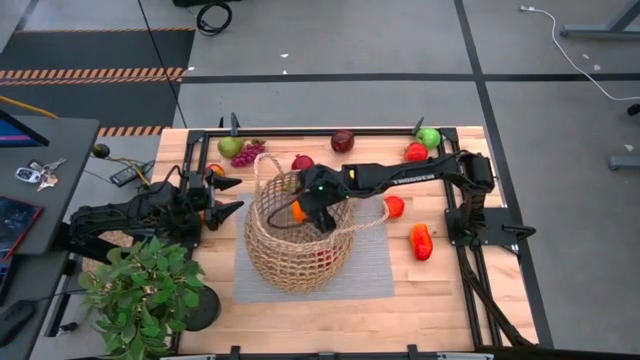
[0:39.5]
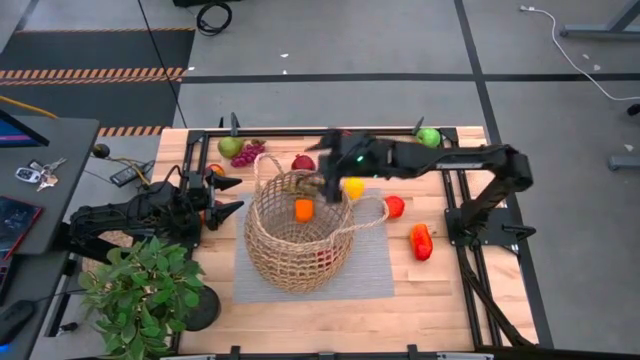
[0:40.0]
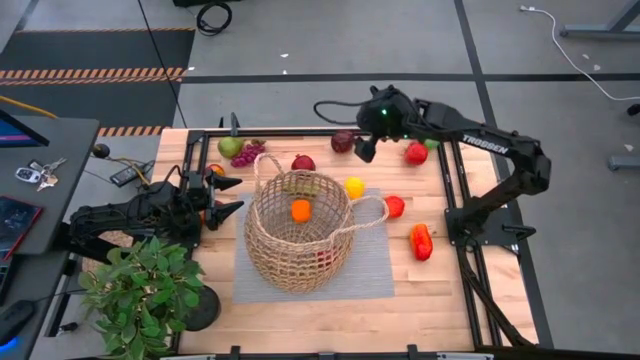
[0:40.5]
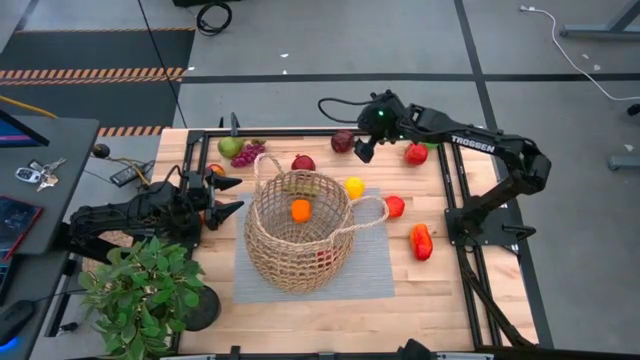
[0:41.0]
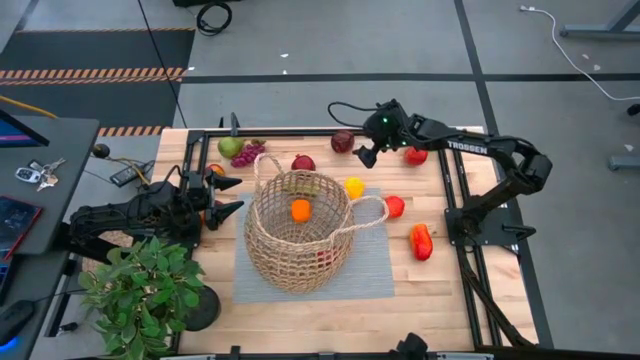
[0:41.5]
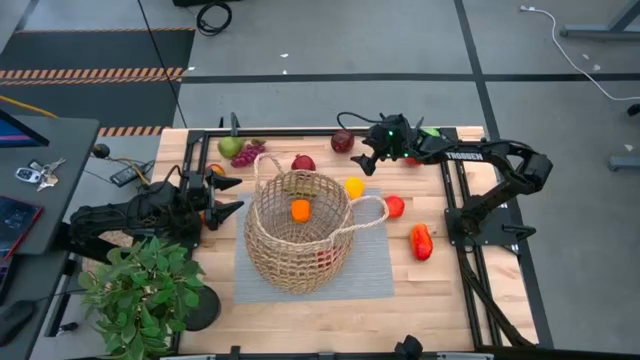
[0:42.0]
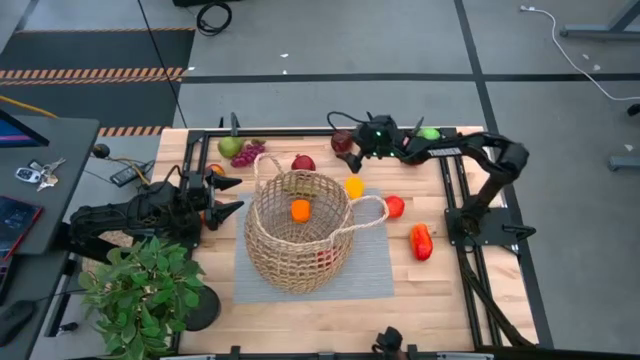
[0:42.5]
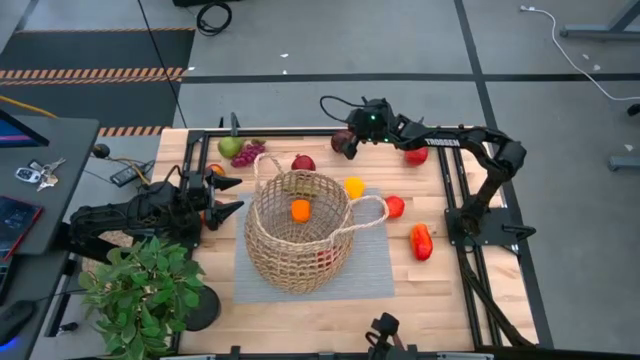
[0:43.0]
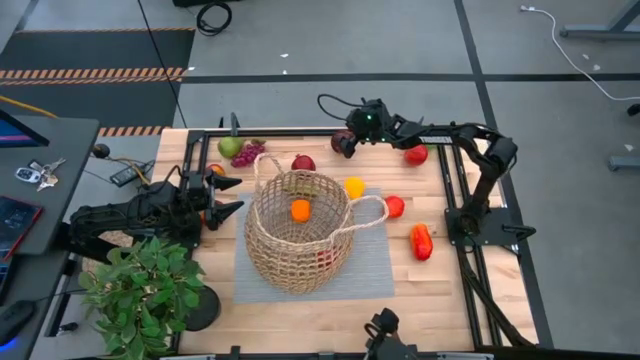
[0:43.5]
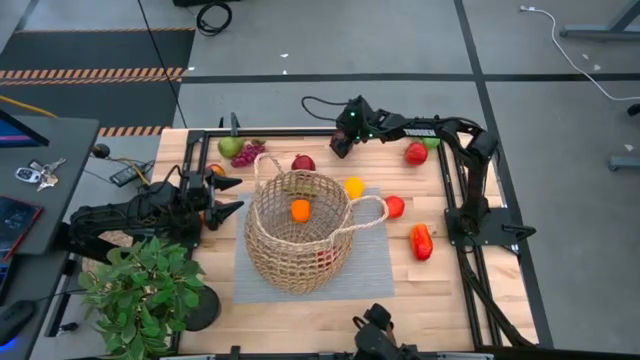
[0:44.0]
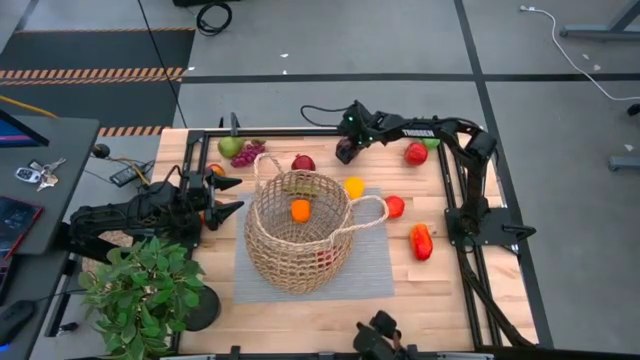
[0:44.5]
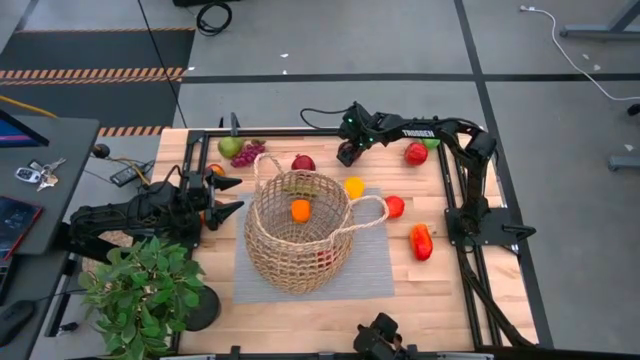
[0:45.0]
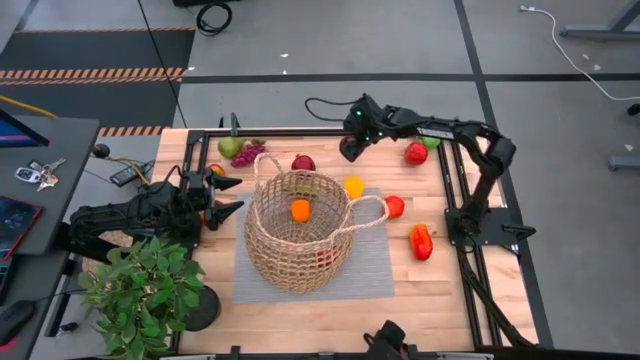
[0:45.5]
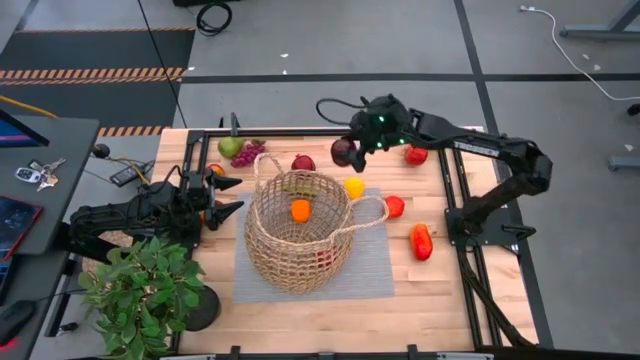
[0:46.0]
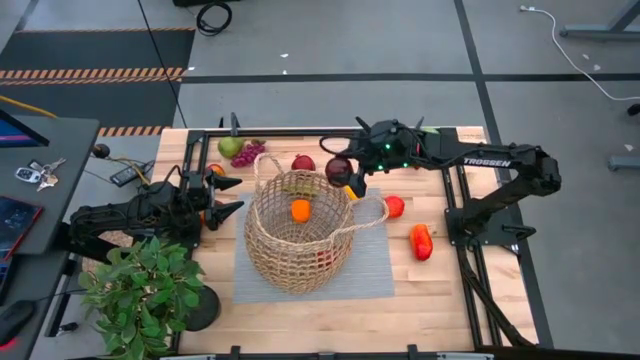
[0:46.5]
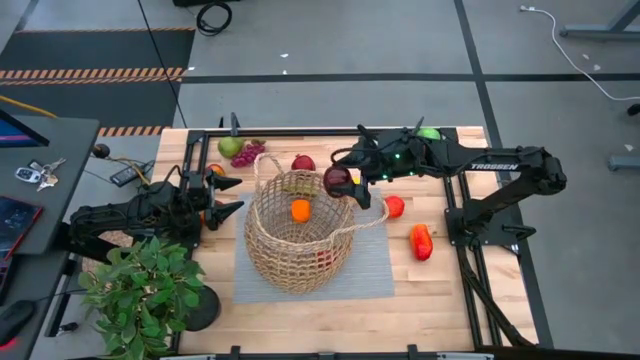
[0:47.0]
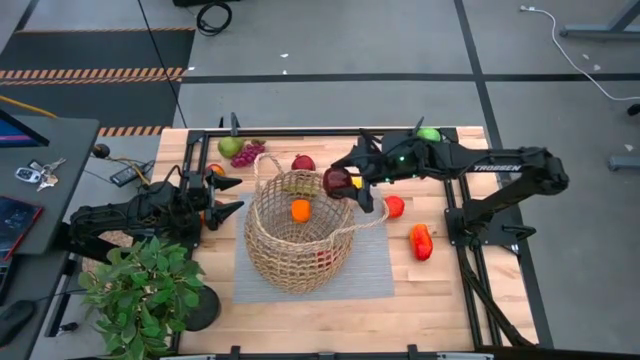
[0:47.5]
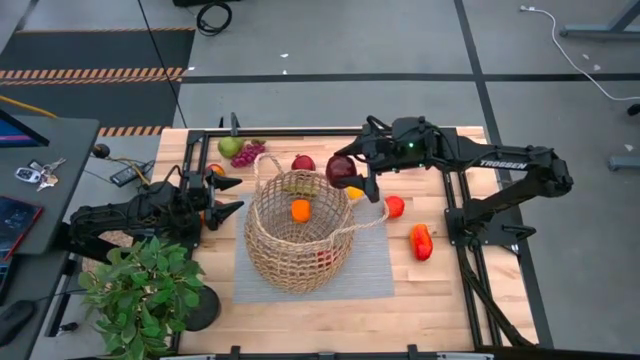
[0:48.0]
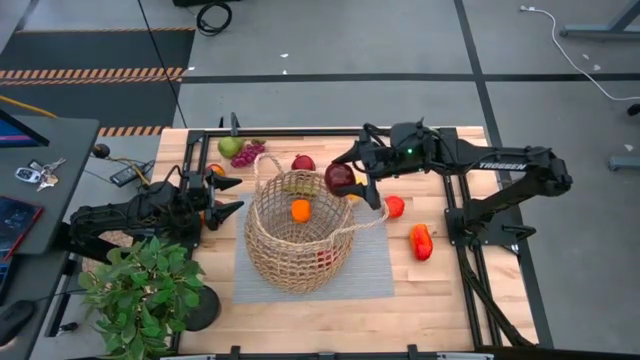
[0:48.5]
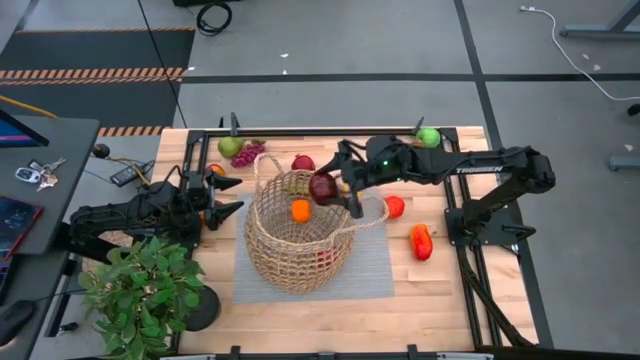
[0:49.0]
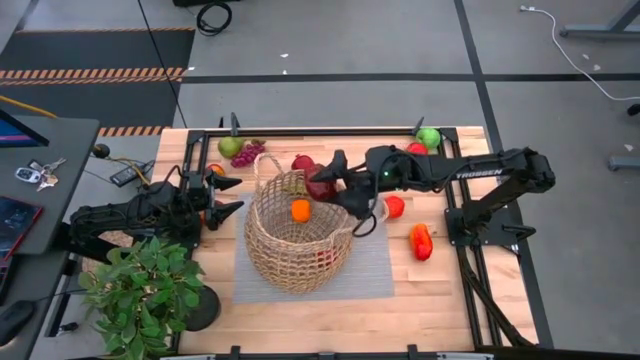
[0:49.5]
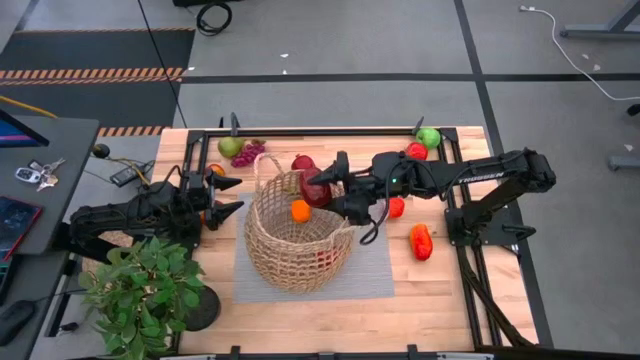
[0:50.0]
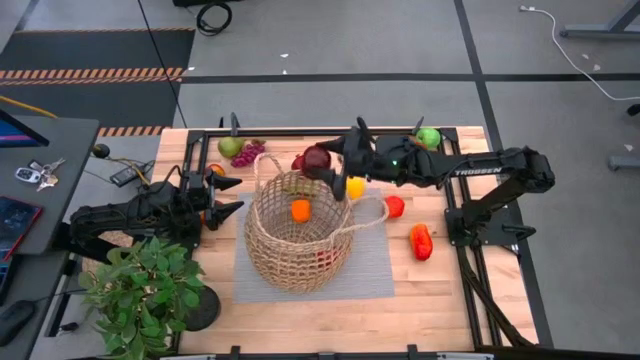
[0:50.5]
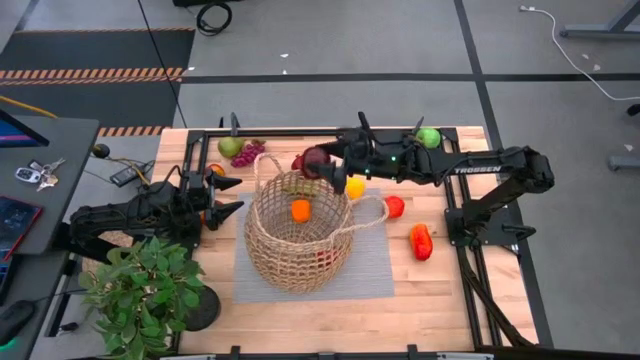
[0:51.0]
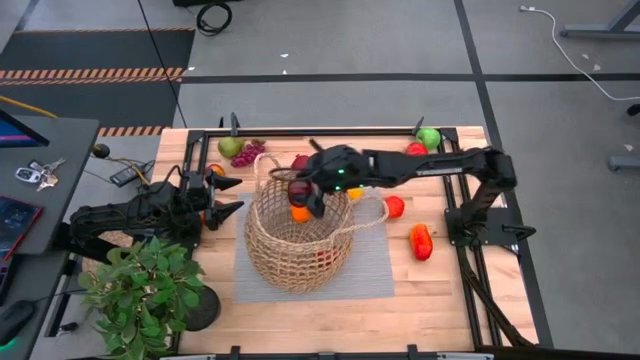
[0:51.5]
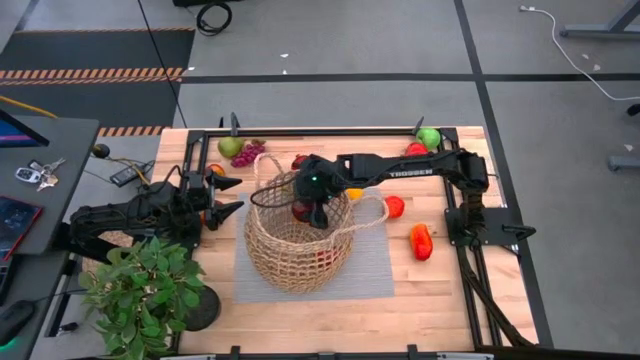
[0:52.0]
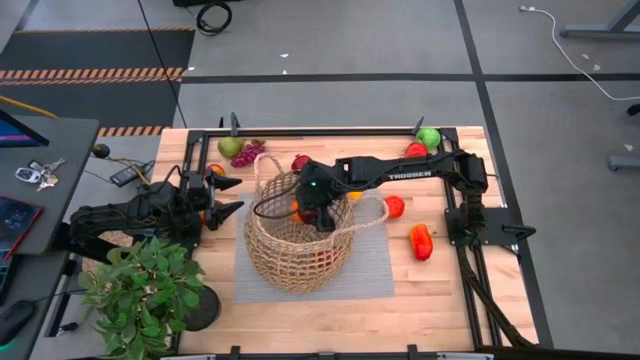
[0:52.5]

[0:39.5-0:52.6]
Task: Build produce basket
Put the red apple into the brown woven basket

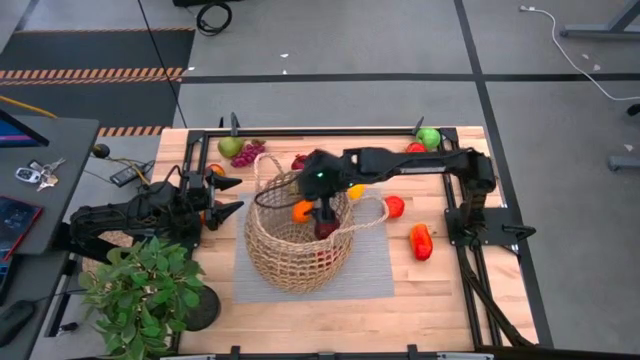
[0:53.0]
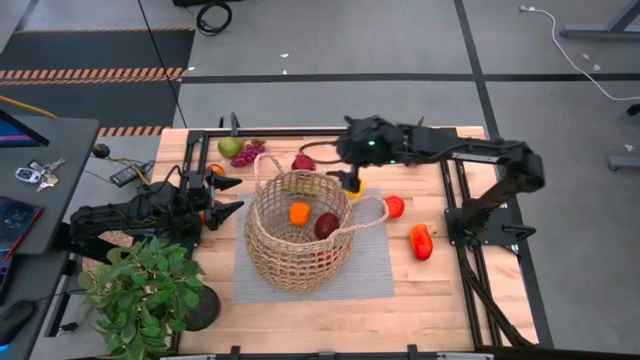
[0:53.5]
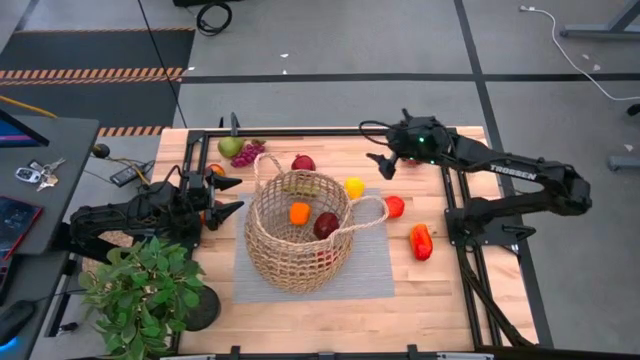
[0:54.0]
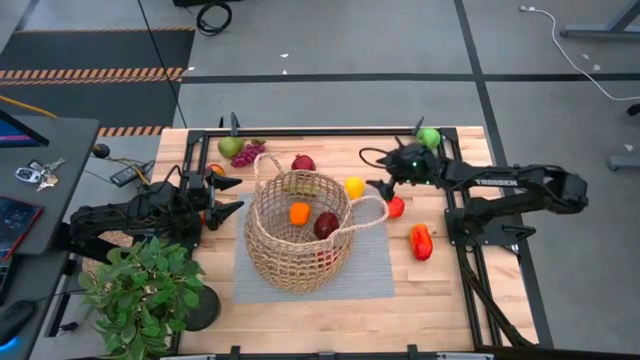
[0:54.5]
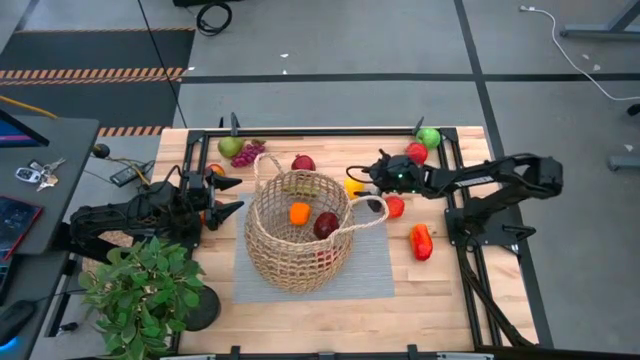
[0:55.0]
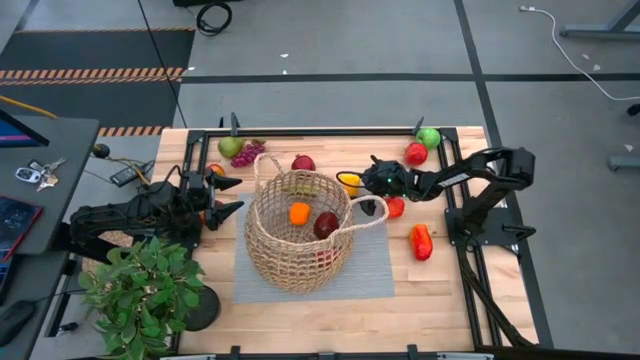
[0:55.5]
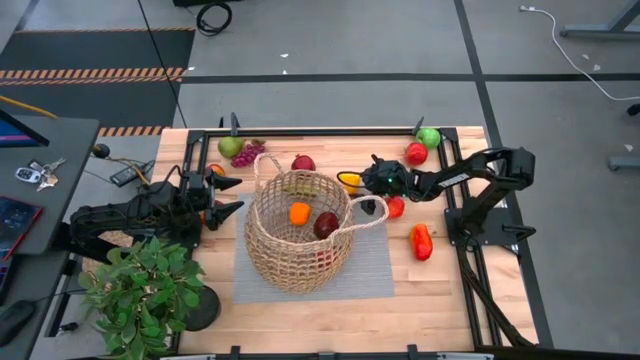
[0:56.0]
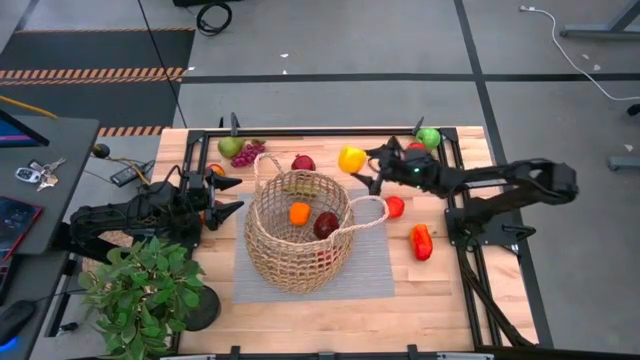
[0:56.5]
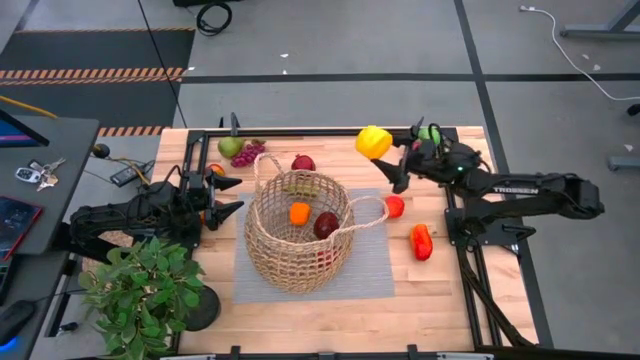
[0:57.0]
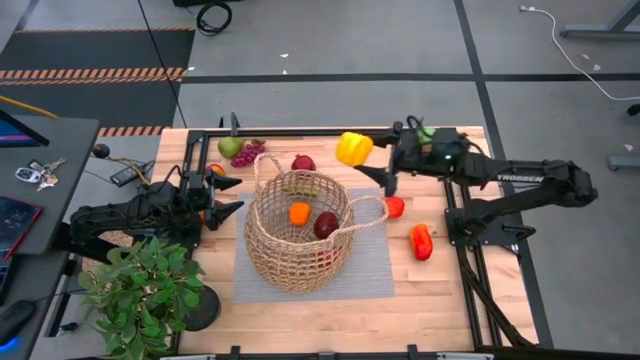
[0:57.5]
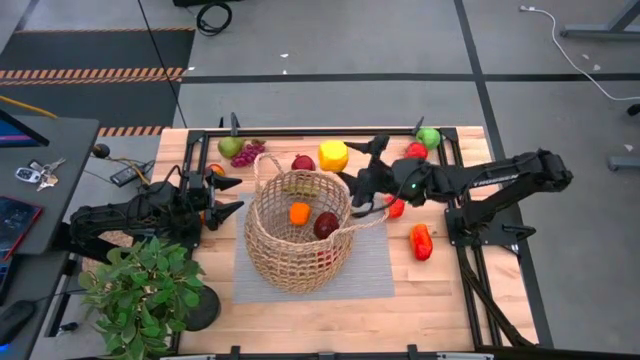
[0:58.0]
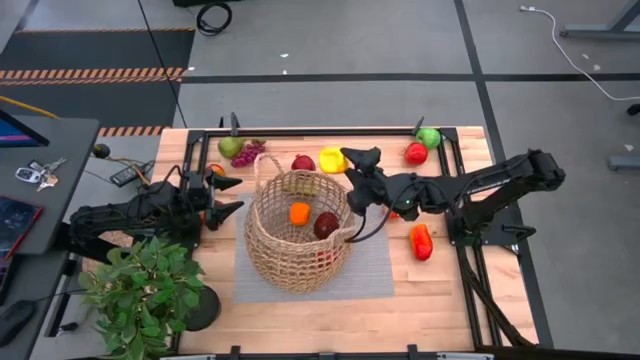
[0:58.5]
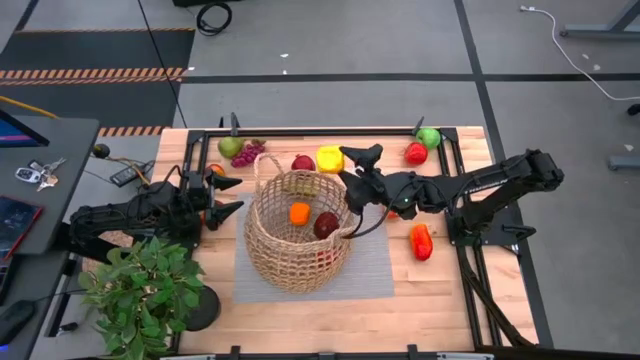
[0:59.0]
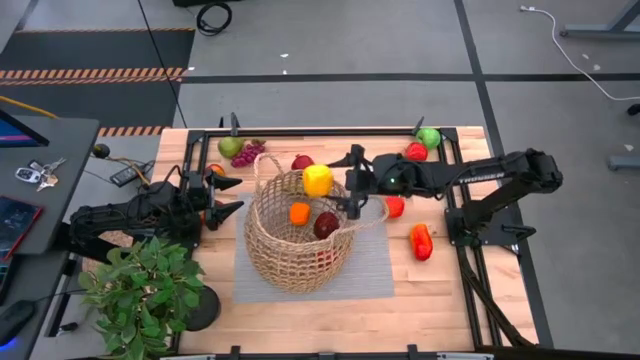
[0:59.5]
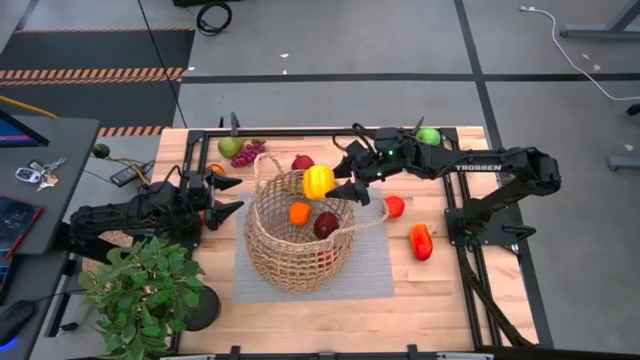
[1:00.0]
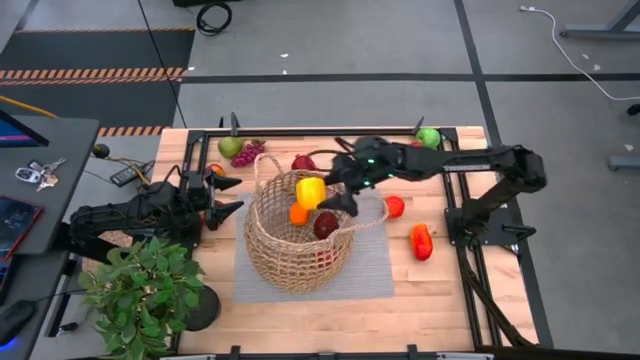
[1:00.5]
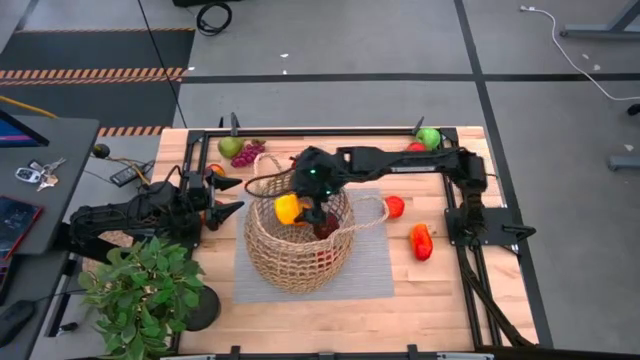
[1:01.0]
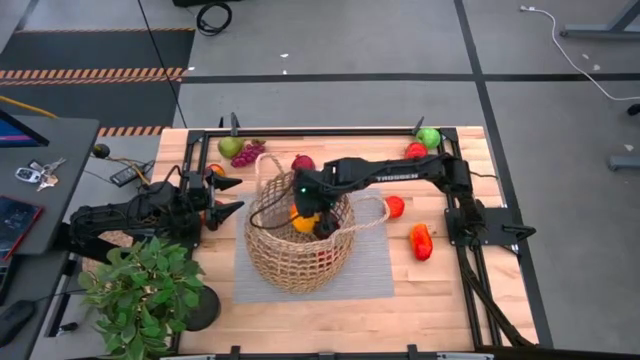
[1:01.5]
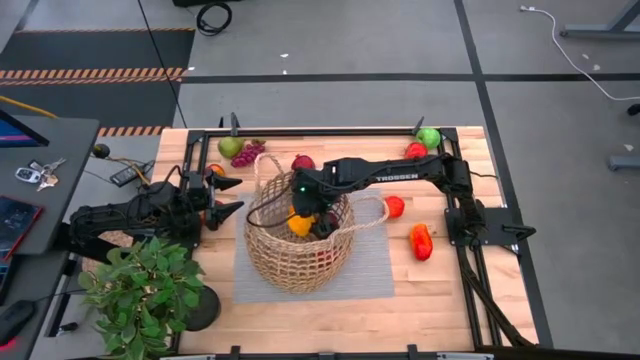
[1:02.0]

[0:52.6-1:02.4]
Put the yellow bell pepper into the brown woven basket
